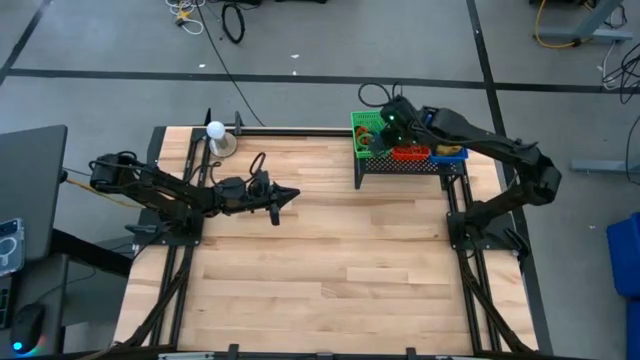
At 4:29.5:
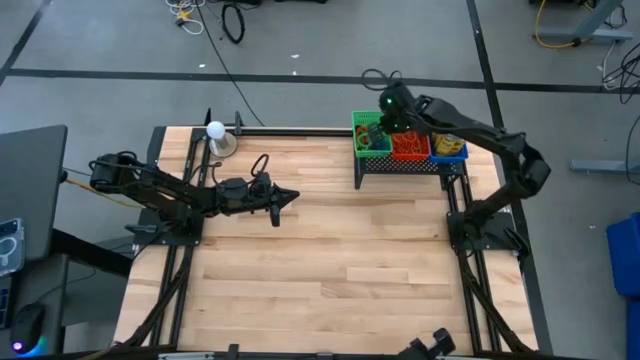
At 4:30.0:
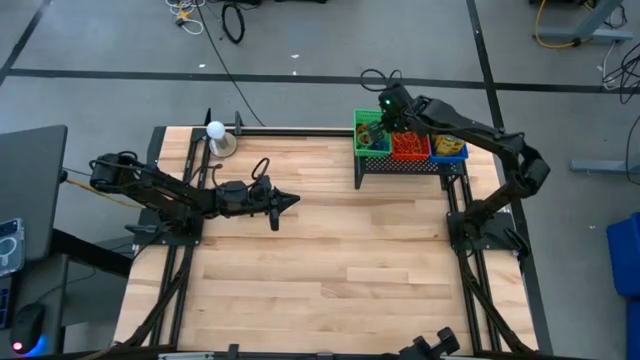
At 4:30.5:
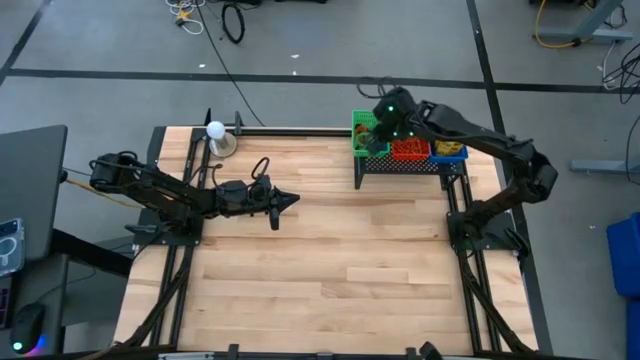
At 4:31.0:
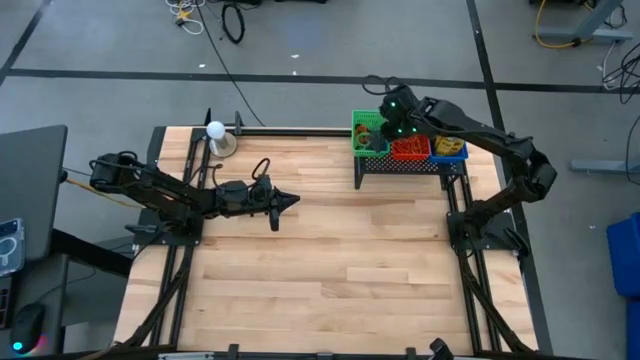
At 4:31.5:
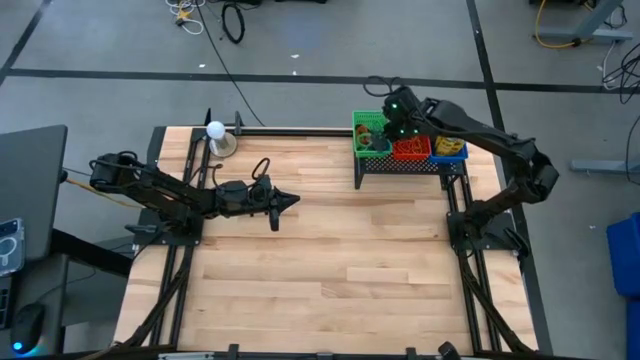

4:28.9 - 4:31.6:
Task: Pick & Place Office Desk Supplies
Adjust the green bin

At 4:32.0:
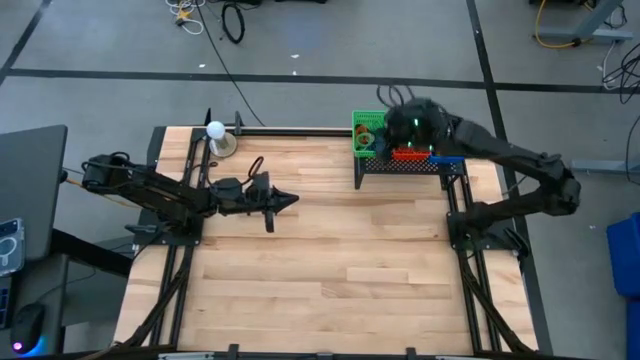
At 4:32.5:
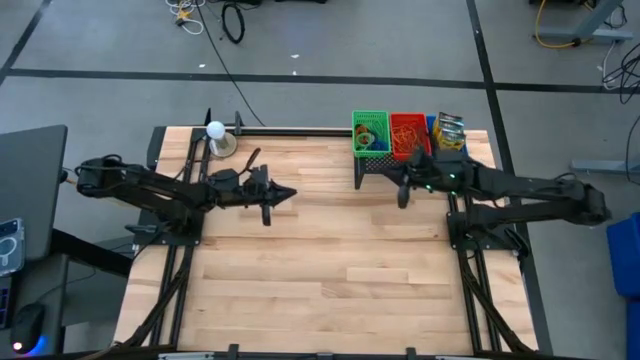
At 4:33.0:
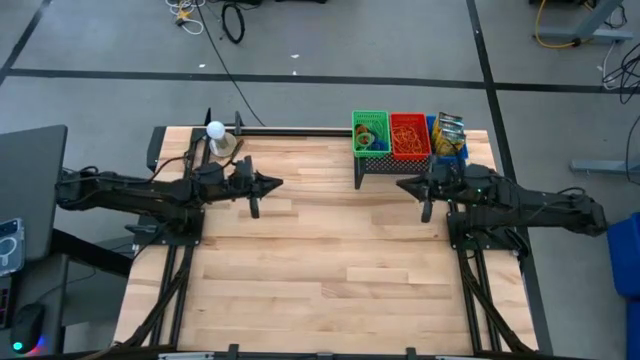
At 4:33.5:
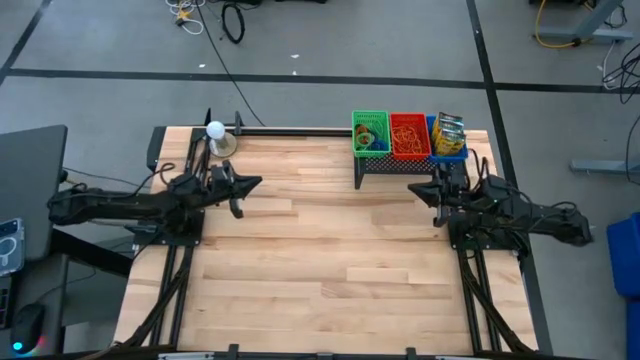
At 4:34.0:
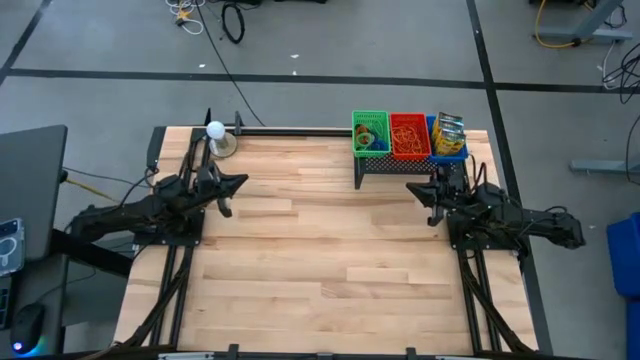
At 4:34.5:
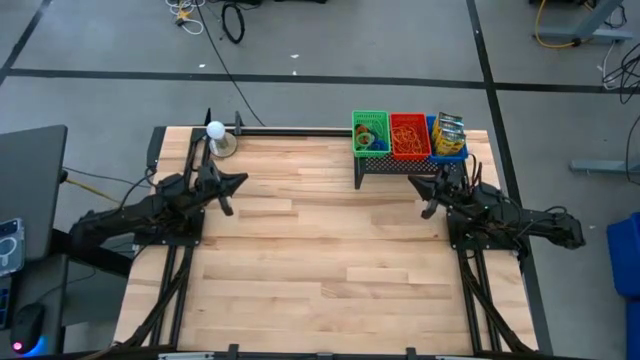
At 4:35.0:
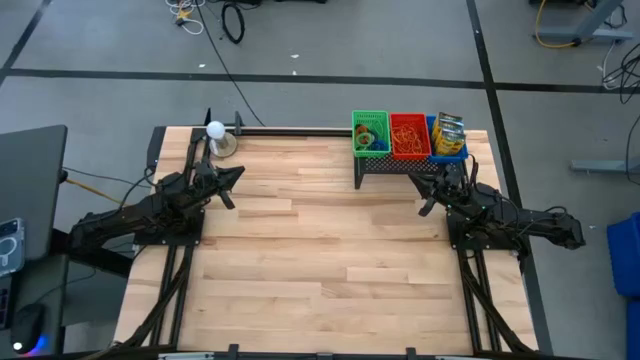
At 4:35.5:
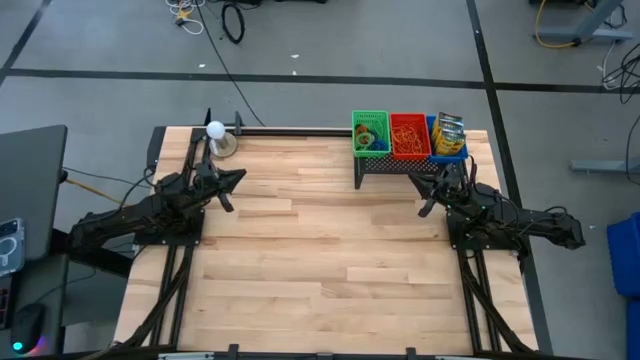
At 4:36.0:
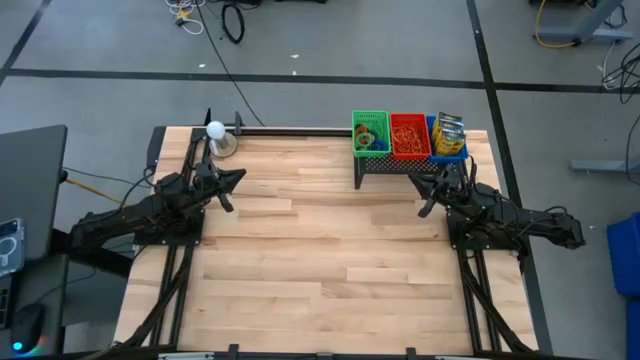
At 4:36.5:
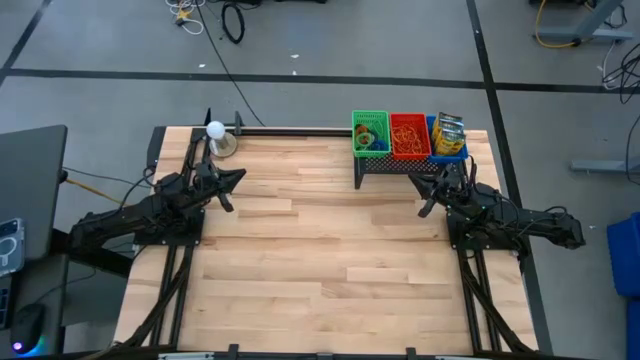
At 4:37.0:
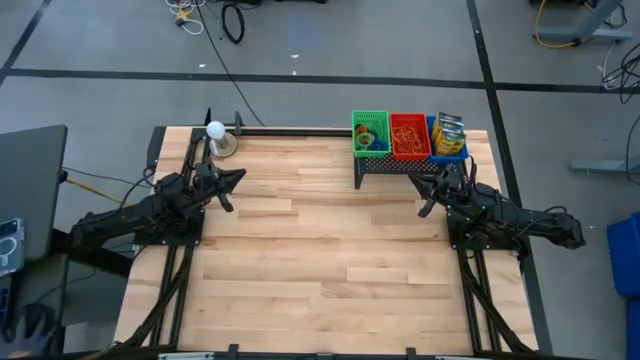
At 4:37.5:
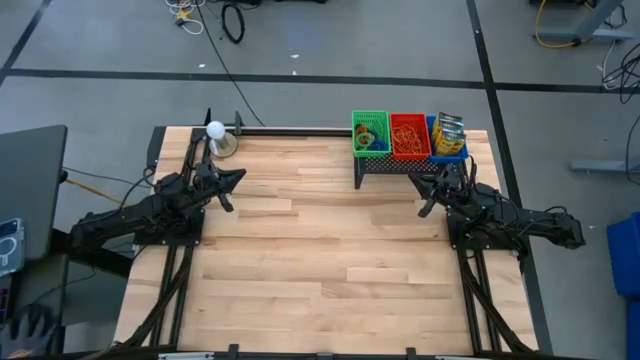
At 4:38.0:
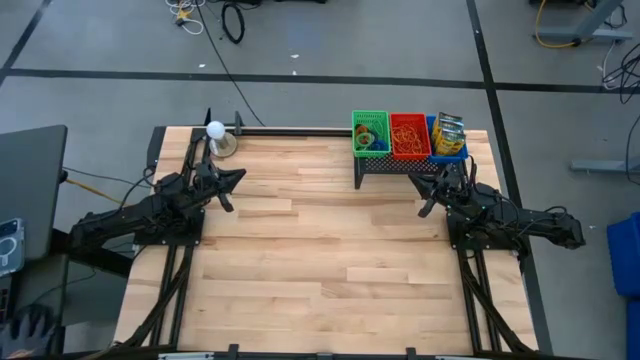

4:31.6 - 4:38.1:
Return to Home Position

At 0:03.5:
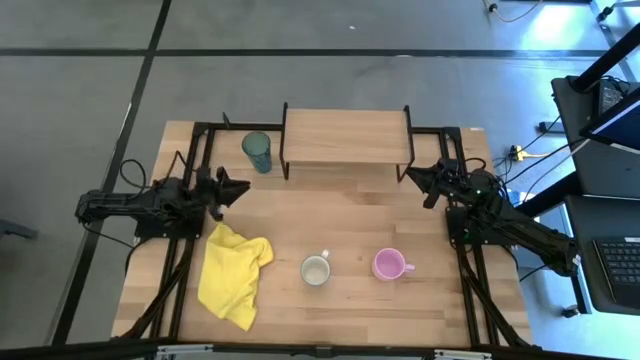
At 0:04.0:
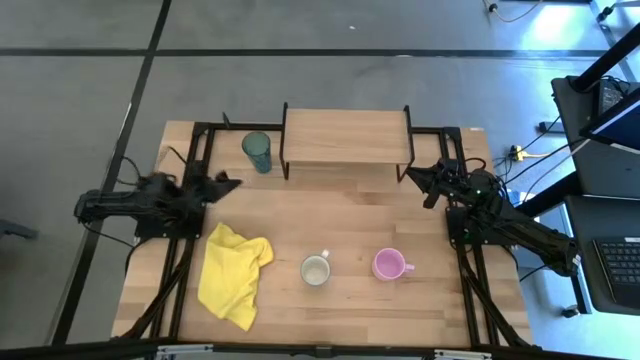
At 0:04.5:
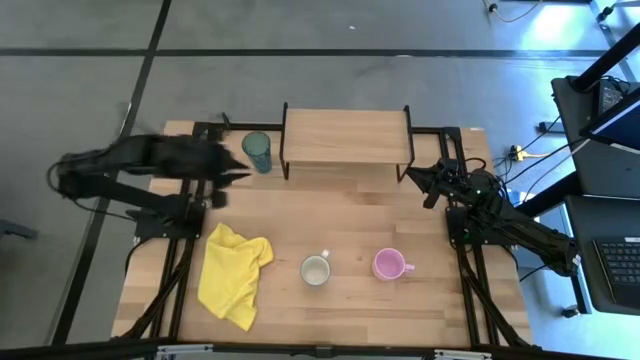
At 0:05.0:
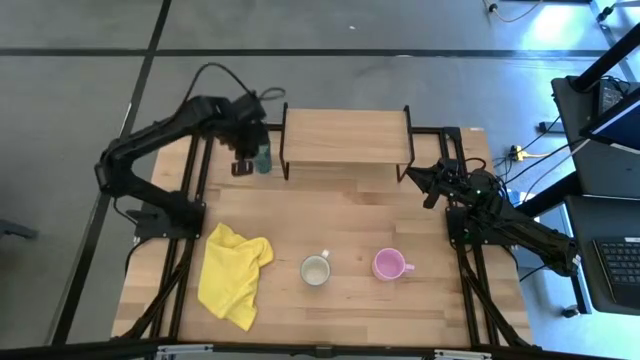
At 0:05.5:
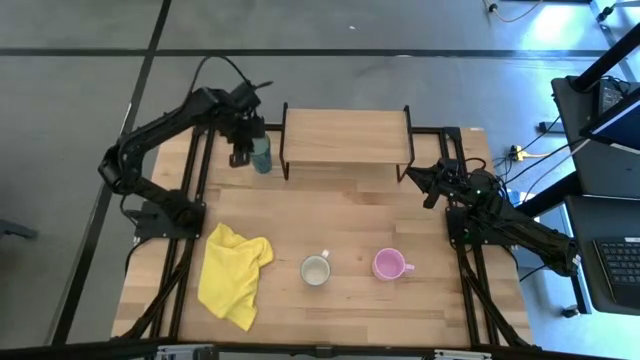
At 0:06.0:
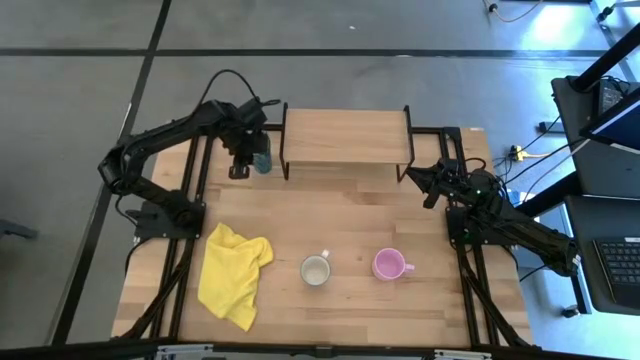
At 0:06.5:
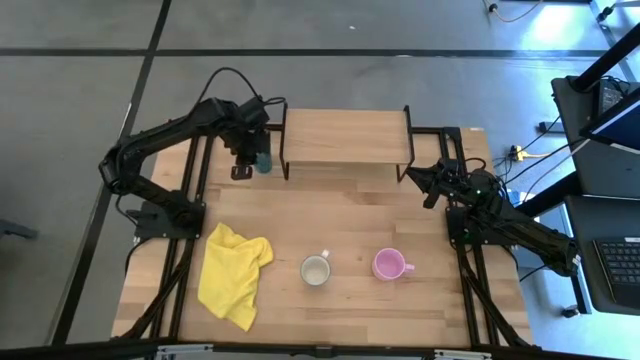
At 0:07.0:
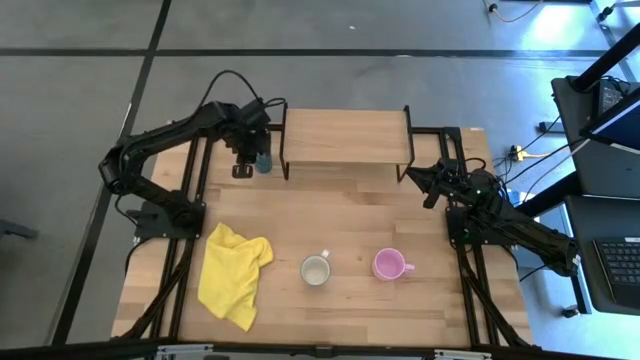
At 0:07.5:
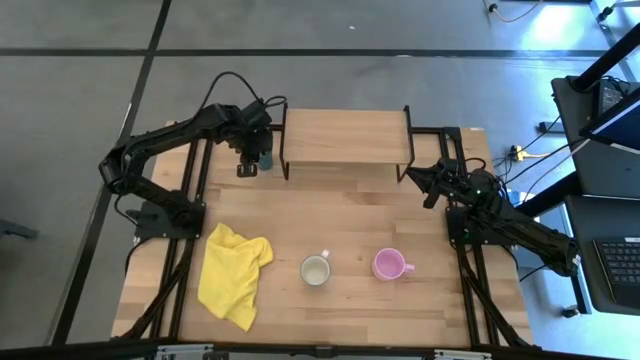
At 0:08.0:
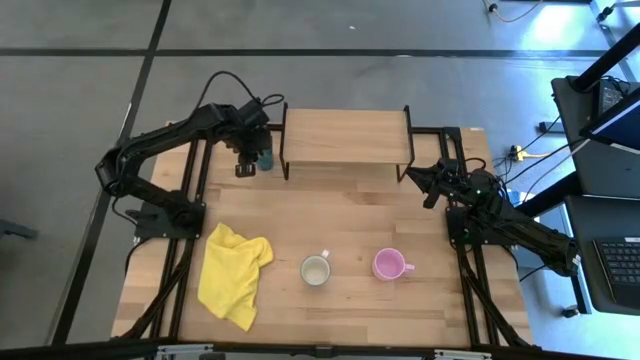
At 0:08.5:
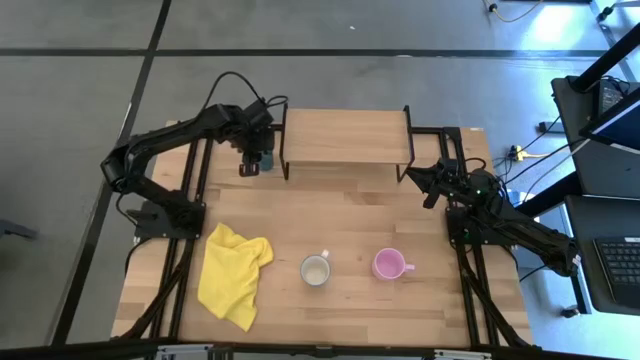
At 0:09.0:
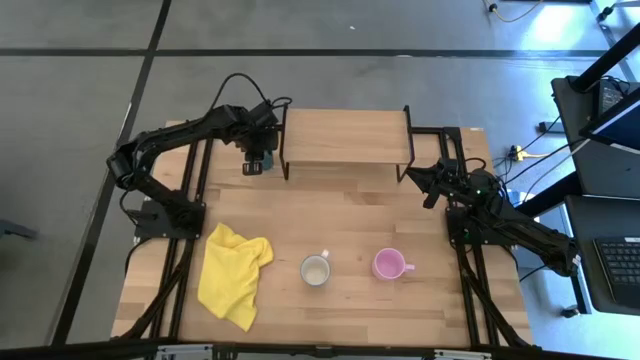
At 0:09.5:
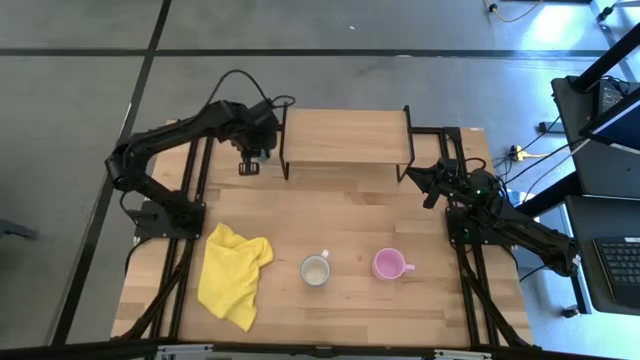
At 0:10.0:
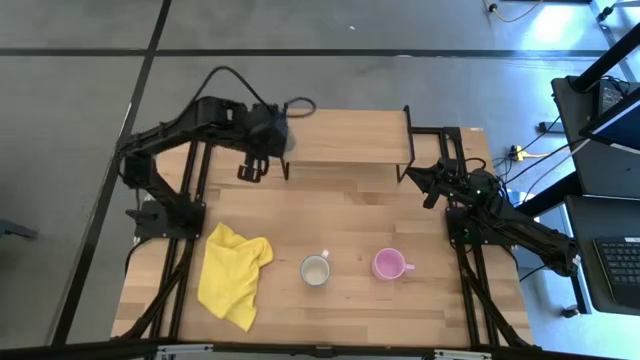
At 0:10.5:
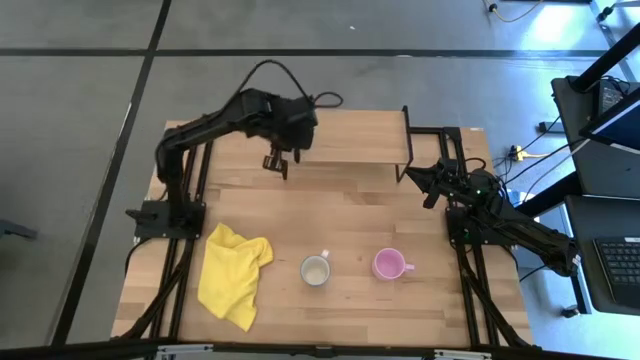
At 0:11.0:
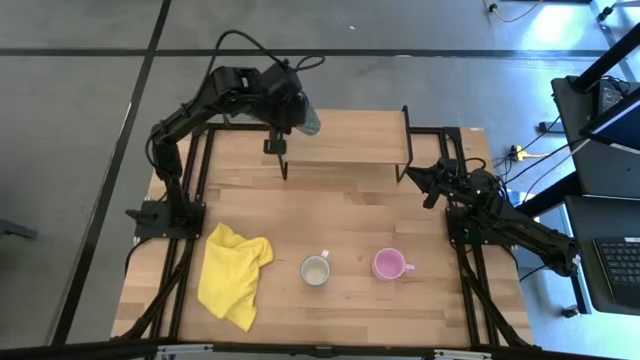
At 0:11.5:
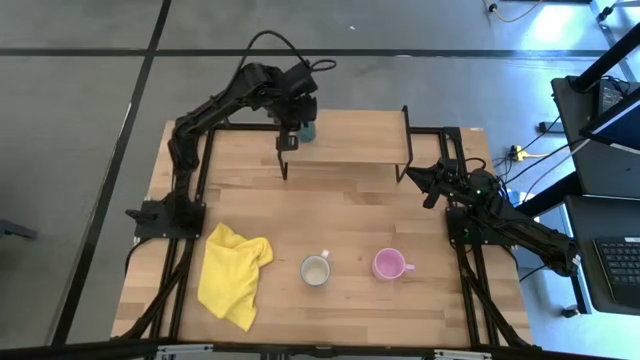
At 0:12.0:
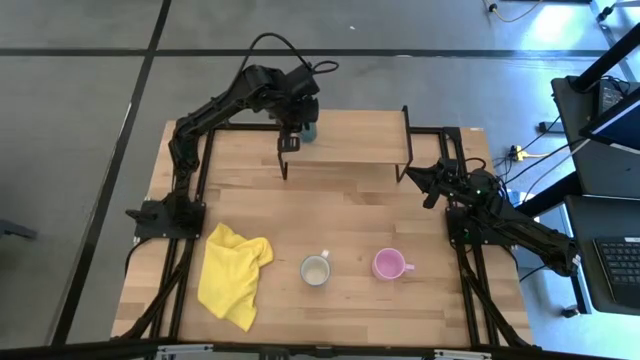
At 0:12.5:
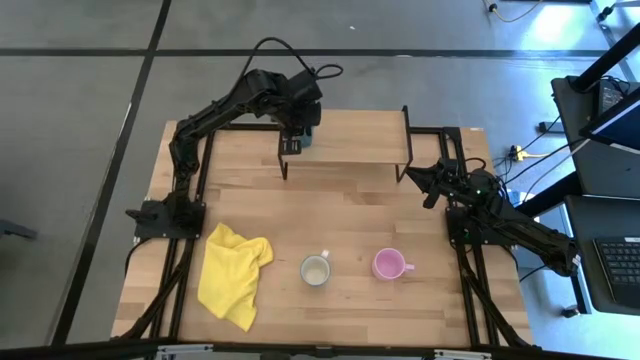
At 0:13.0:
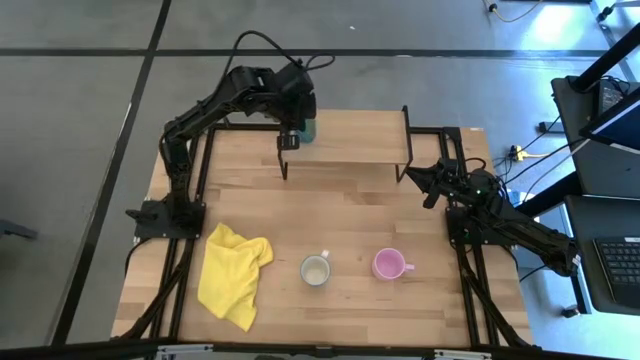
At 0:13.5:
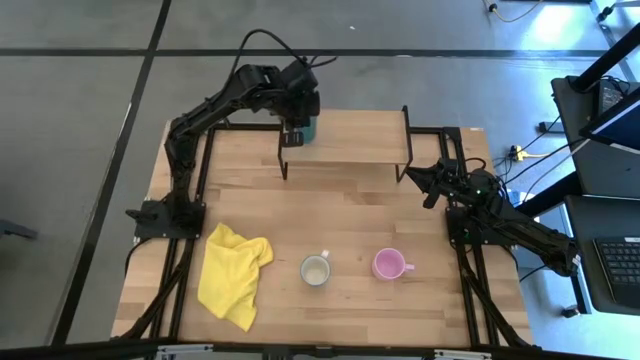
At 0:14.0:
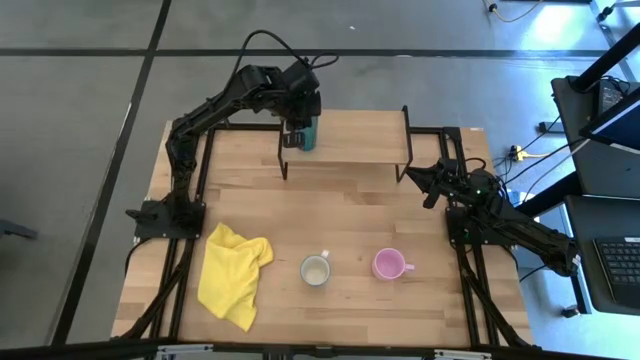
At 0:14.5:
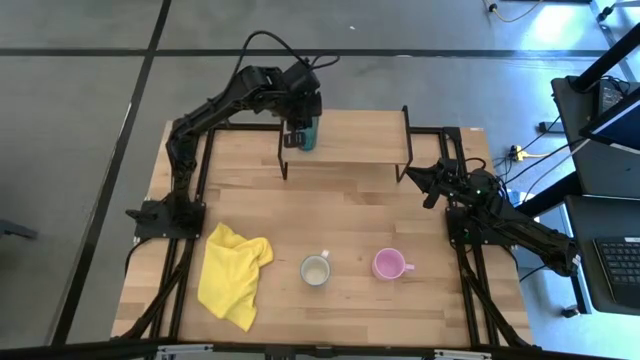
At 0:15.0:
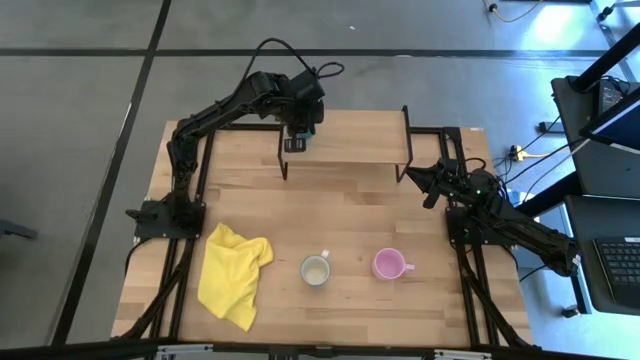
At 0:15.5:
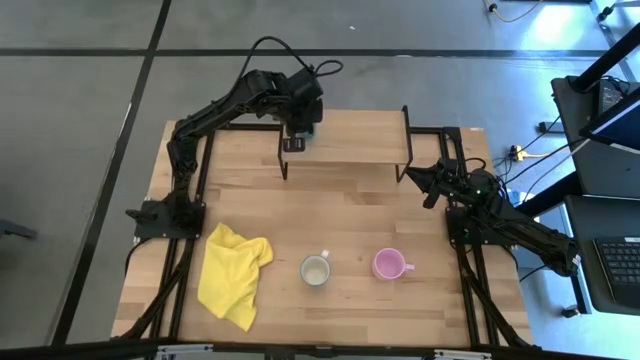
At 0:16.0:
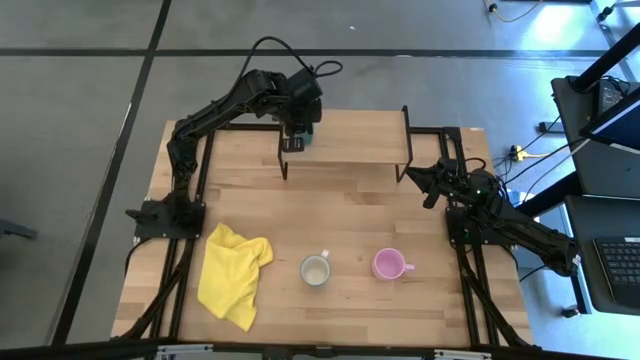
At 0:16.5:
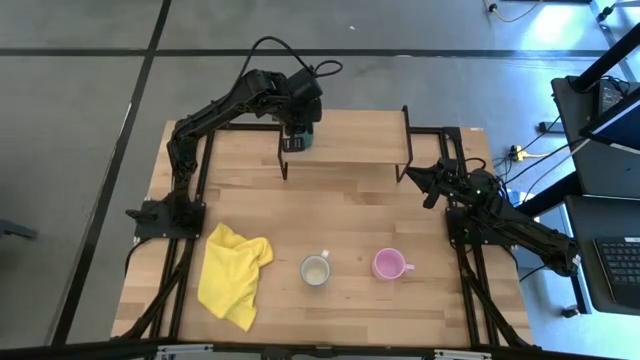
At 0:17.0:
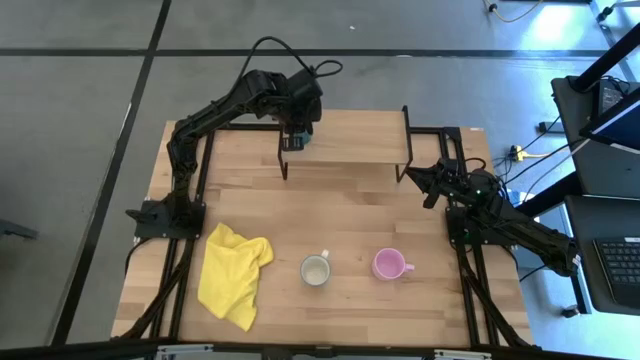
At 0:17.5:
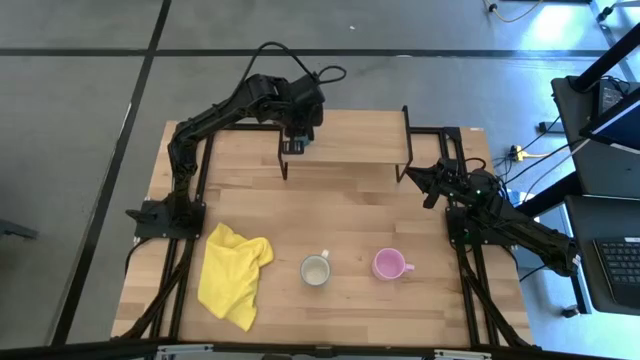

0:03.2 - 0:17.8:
Task: Stack small to large cups/mugs on shelf
Put the blue cup on the shelf
